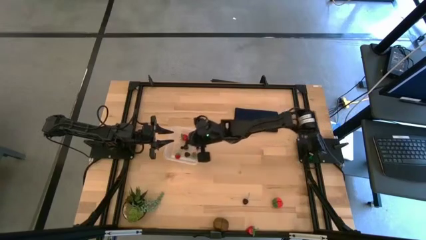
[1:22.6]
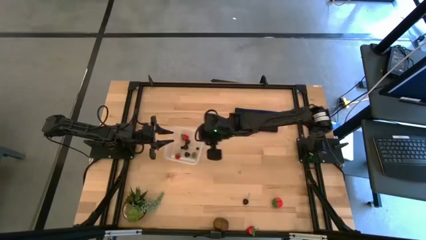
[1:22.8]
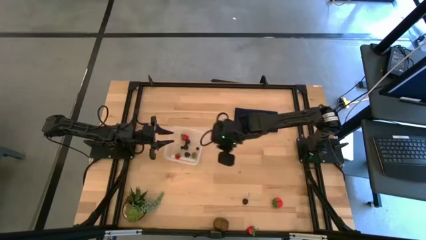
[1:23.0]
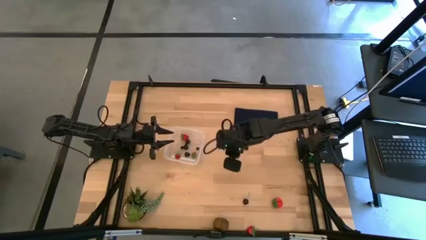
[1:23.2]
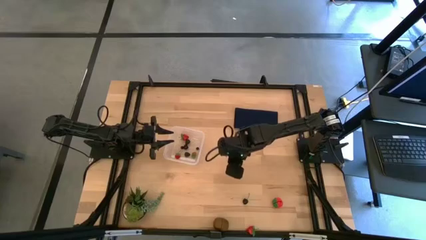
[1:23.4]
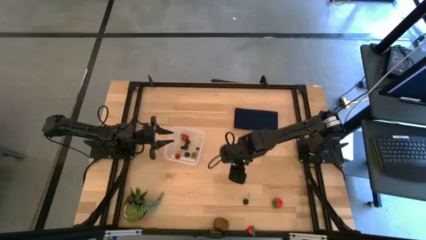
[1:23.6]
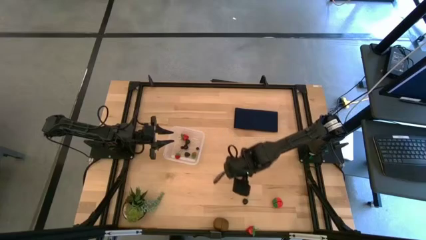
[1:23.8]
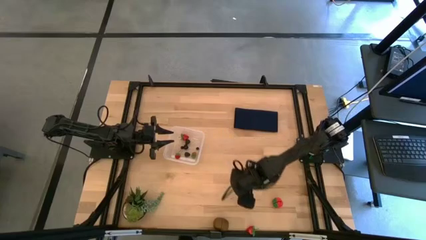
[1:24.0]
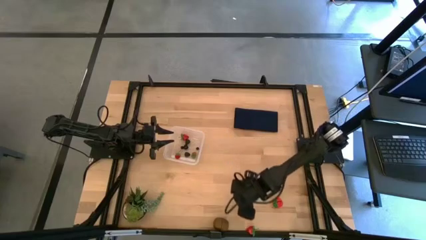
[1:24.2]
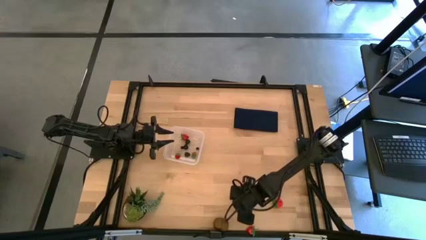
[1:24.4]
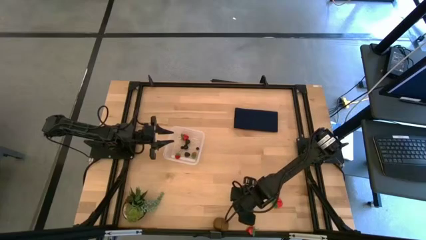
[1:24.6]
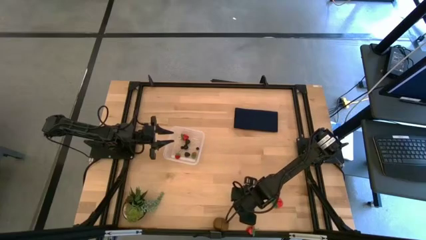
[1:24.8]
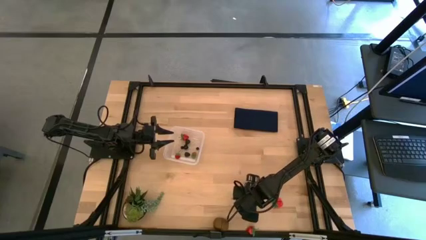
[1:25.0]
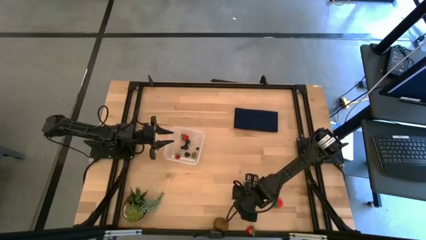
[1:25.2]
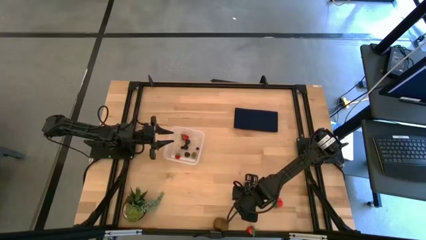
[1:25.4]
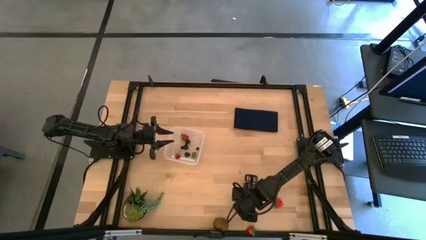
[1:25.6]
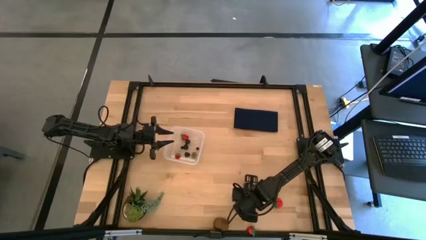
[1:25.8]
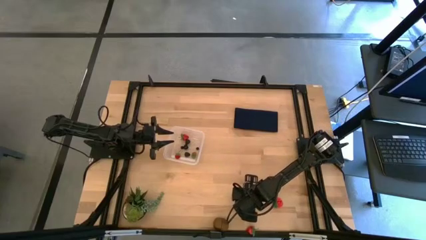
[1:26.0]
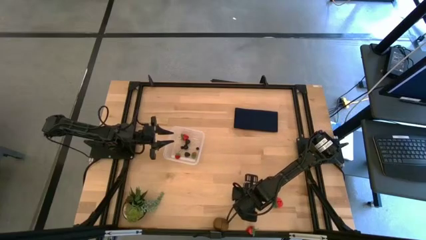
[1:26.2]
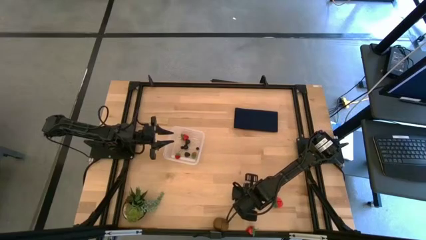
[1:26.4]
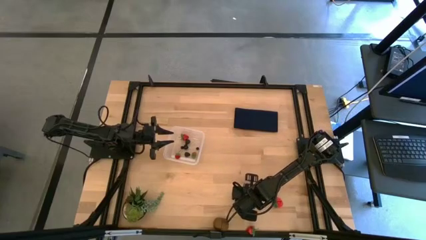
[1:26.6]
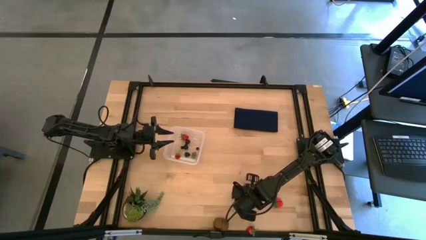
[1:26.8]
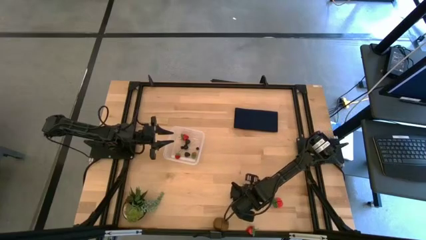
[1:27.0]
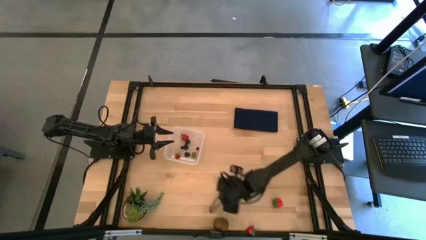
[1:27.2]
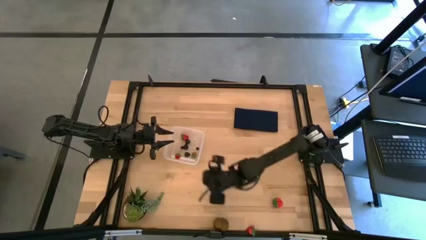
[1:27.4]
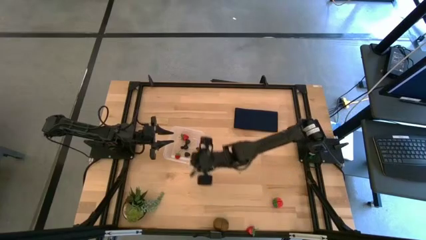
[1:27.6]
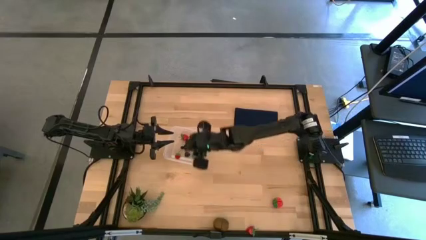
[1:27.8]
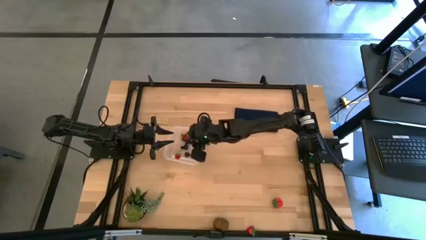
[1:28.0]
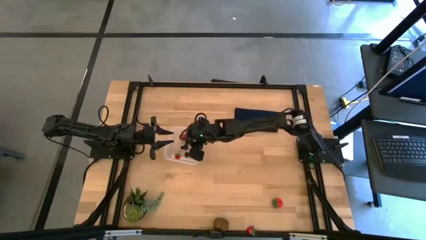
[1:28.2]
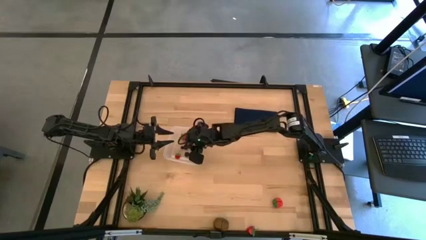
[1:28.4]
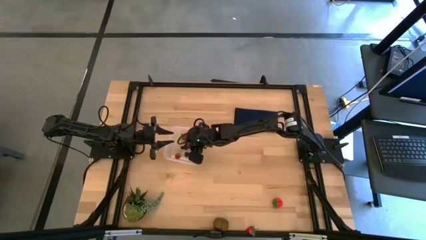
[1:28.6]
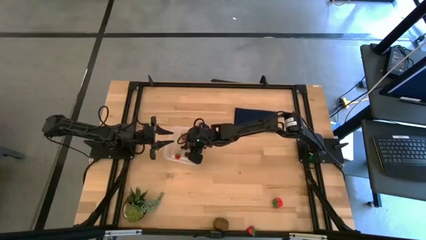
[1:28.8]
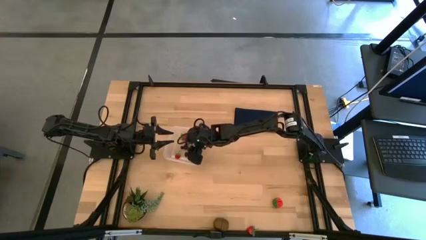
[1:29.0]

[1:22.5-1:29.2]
Task: Pick and placing Produce into tupperware
Put the black cherry into the transparent bin

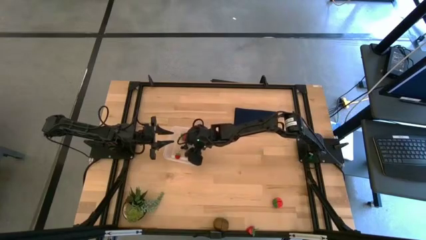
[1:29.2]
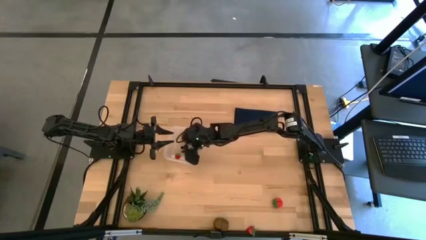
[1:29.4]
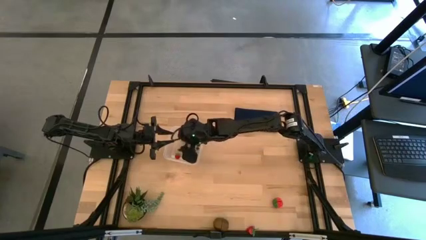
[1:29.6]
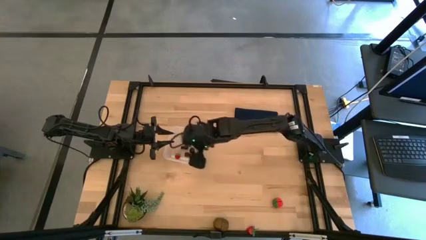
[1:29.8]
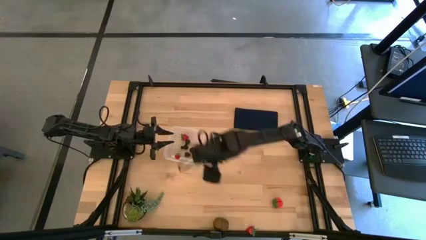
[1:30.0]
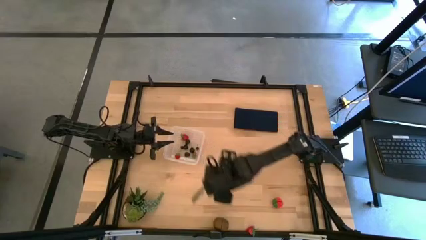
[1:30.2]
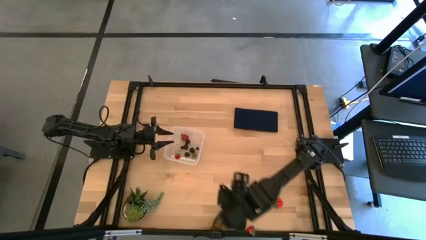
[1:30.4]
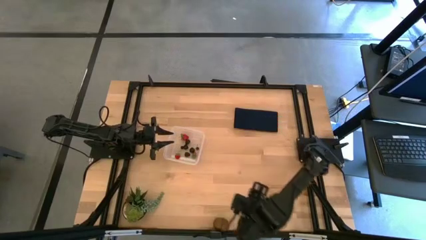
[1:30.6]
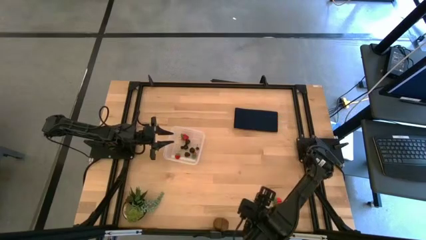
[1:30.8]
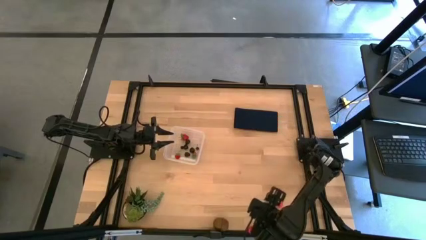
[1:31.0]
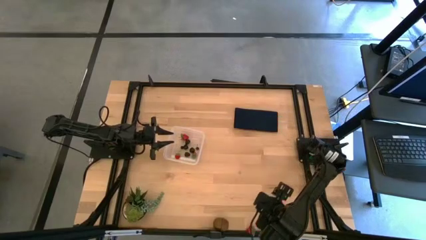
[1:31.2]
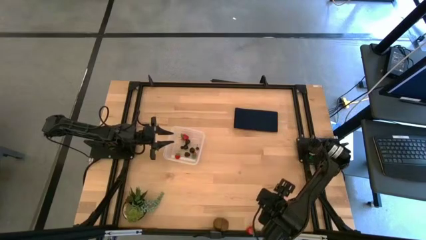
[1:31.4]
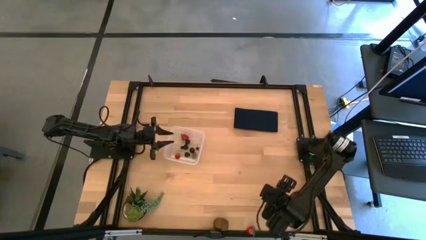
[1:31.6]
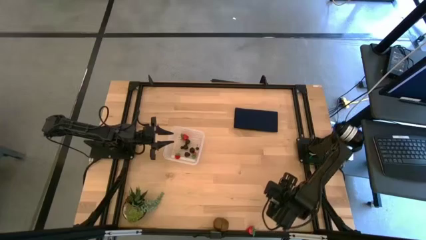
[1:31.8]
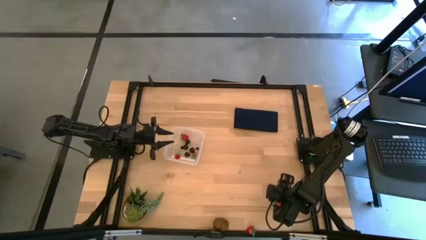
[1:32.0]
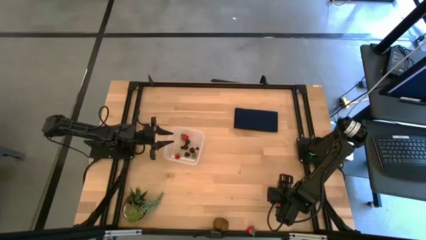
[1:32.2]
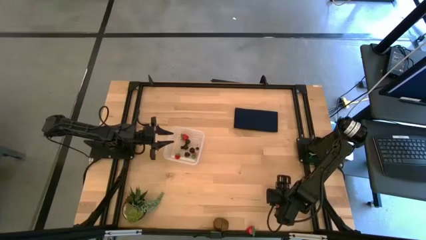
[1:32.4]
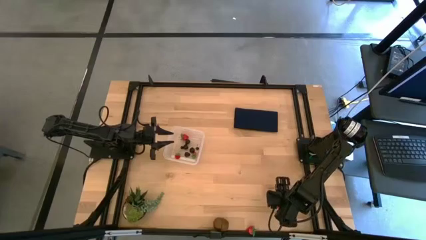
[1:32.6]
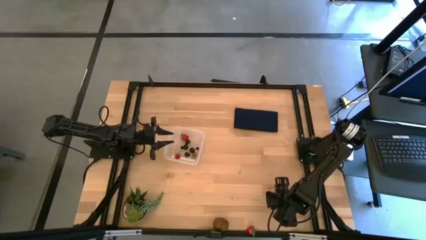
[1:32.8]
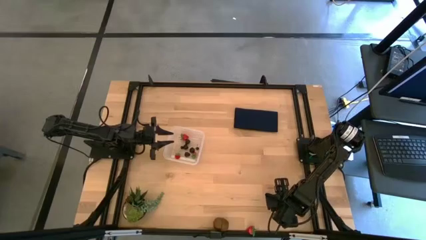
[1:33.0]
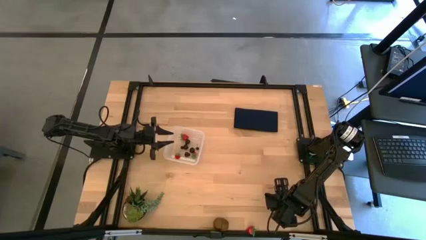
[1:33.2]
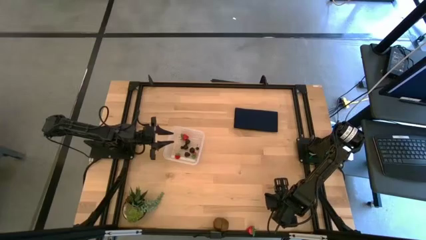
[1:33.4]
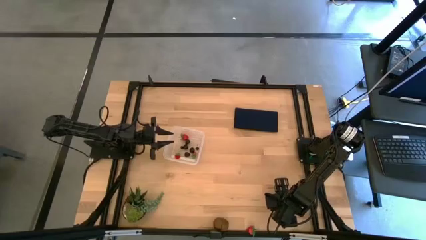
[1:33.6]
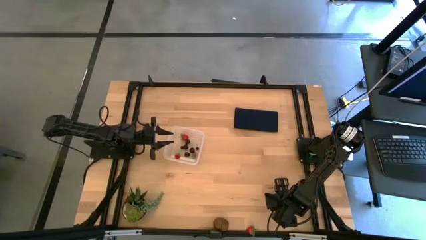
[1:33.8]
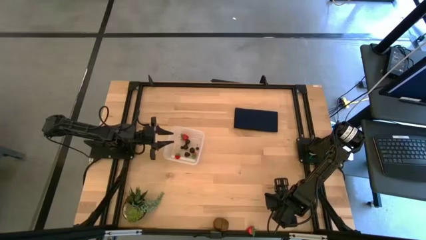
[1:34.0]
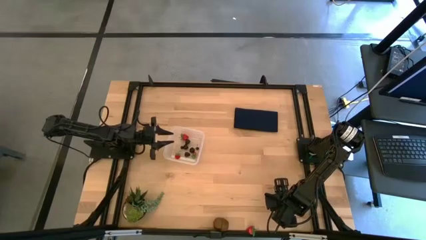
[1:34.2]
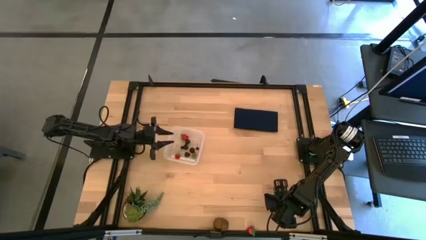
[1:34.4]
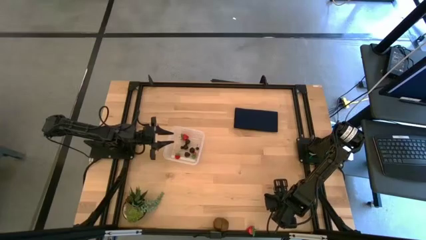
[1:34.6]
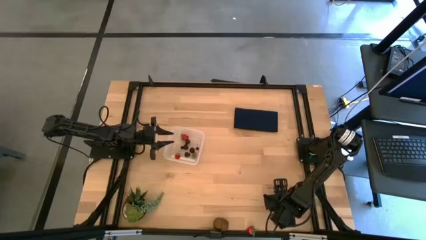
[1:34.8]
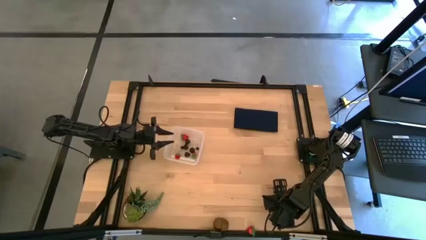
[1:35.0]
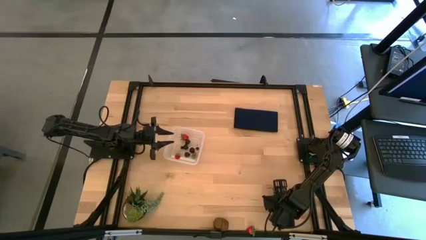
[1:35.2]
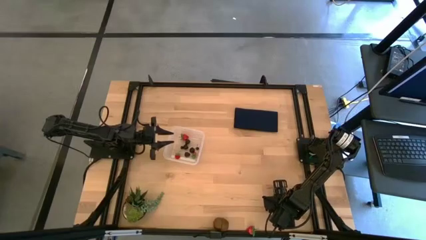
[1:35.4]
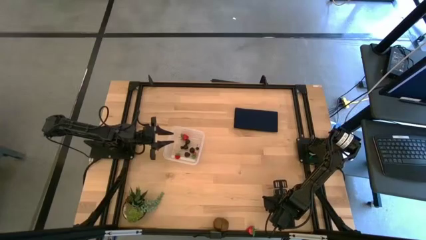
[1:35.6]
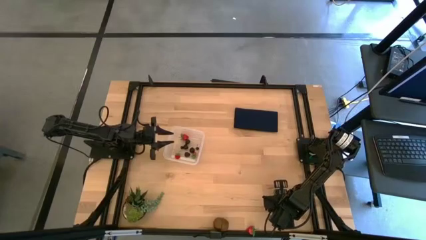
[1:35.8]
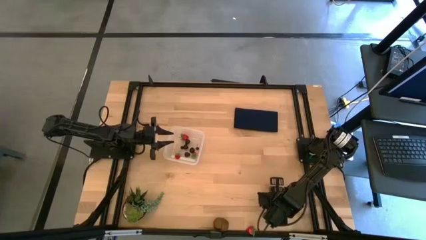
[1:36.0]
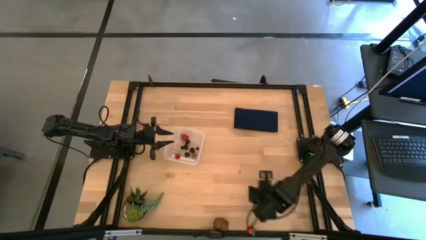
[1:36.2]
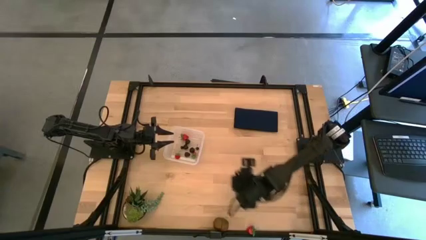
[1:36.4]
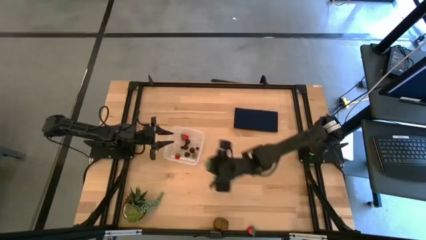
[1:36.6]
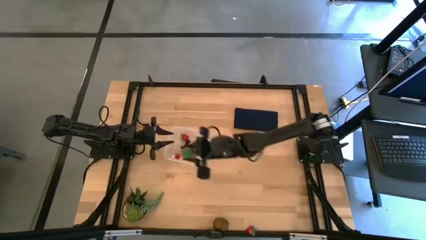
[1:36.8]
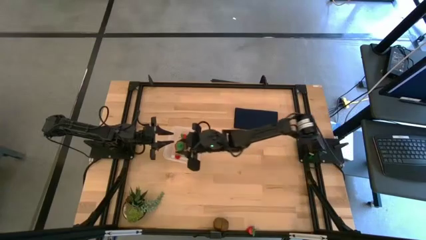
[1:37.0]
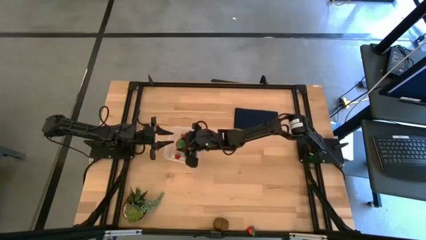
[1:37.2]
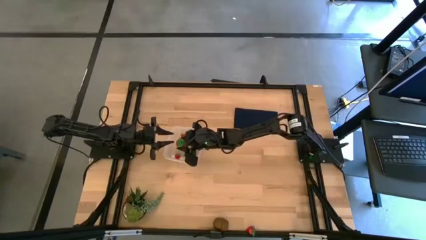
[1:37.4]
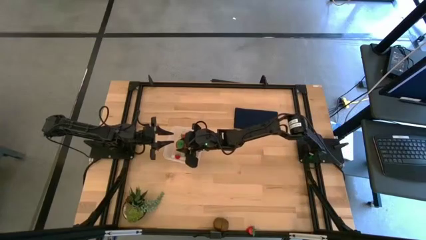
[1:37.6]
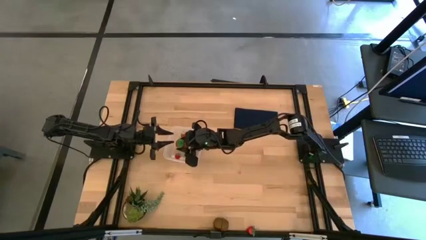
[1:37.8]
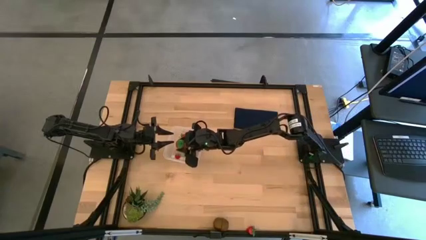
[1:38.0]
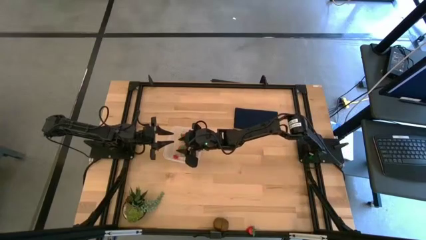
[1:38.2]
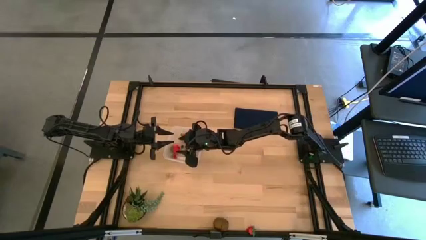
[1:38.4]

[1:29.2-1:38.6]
Put the tomato into the transparent bin

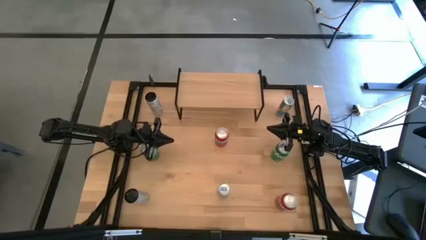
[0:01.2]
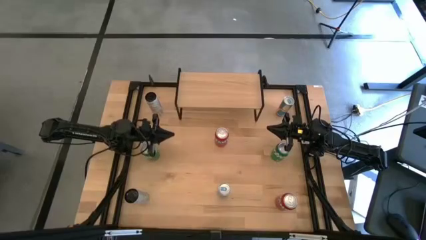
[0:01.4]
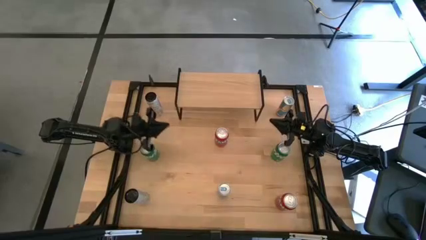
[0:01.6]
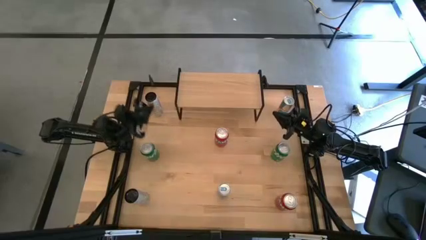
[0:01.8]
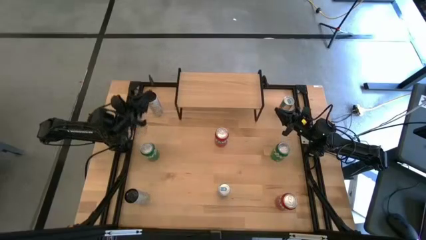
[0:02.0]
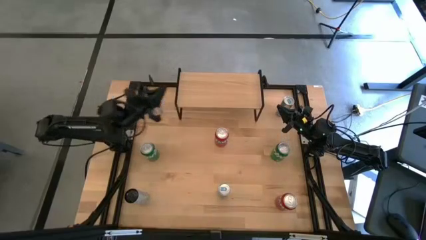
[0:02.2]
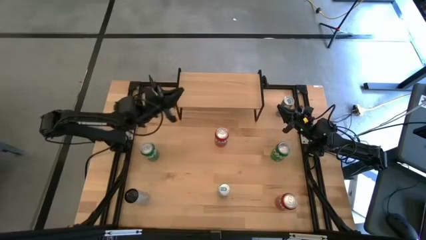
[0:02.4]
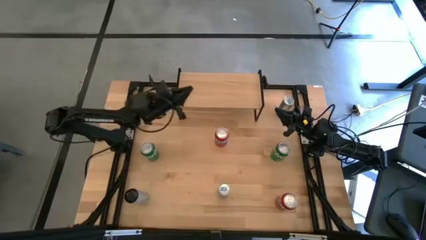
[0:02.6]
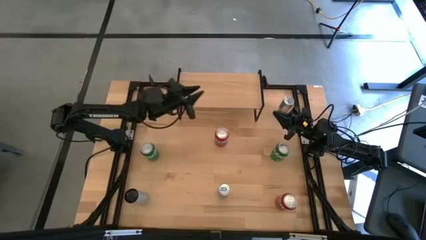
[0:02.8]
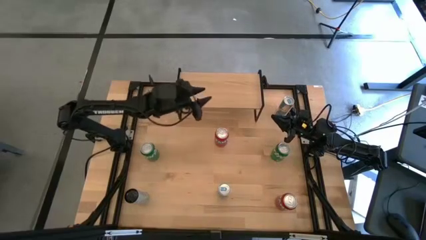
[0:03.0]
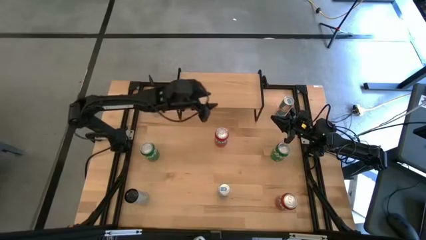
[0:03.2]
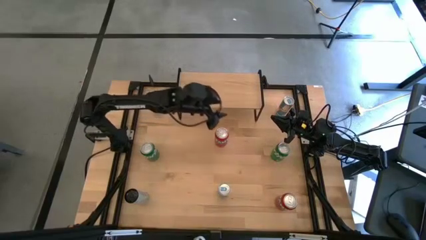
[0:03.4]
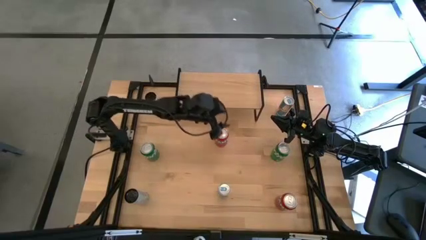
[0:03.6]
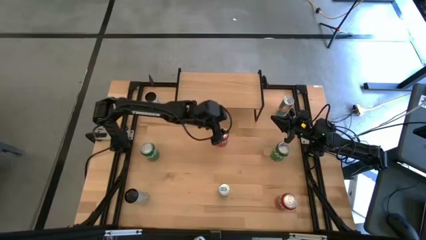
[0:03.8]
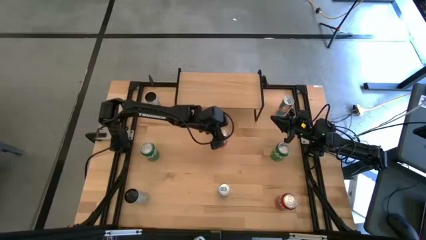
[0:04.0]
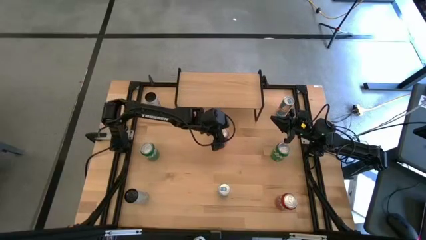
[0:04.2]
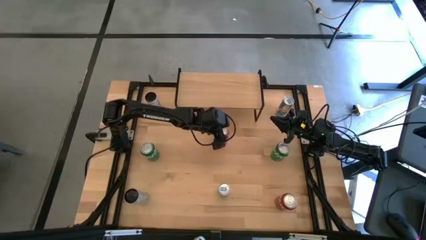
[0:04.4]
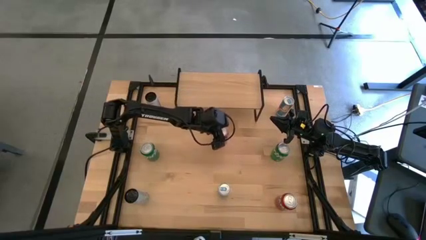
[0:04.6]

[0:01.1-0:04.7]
Task: Place canned beverage on shelf
Put the top red soda can on the shelf
